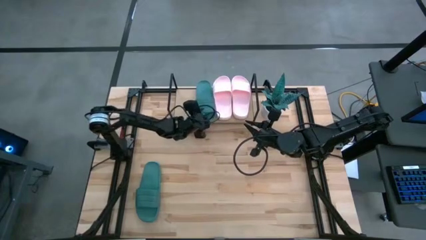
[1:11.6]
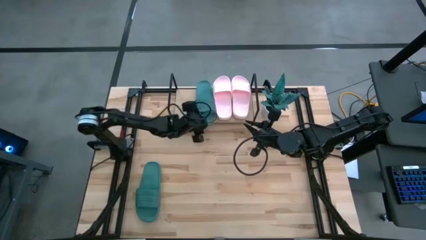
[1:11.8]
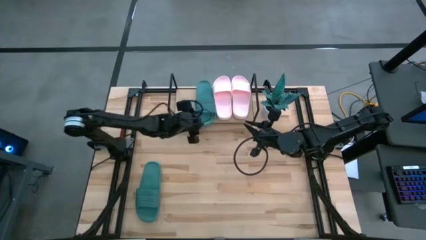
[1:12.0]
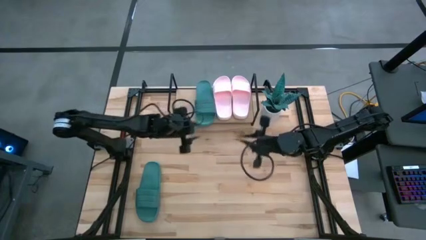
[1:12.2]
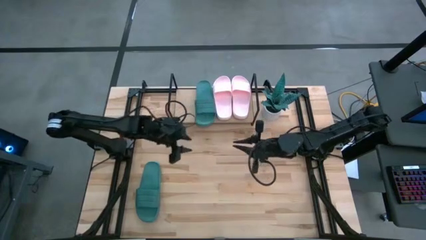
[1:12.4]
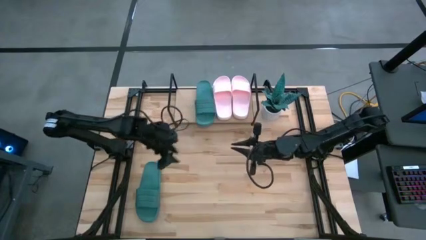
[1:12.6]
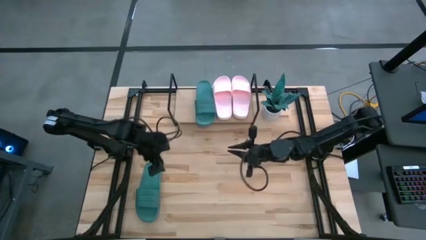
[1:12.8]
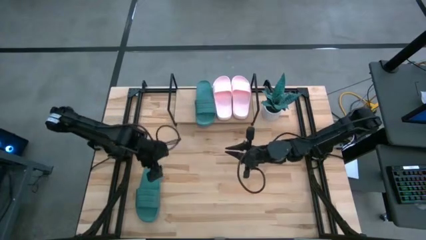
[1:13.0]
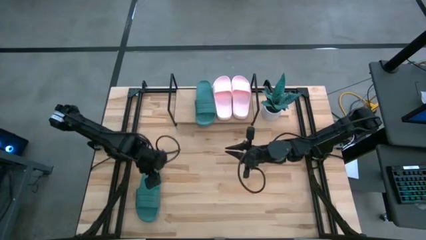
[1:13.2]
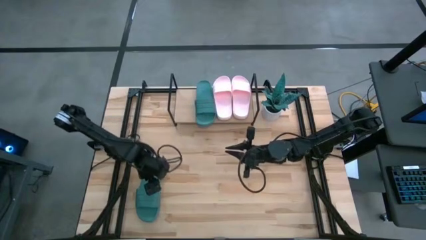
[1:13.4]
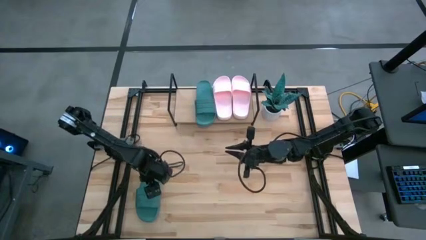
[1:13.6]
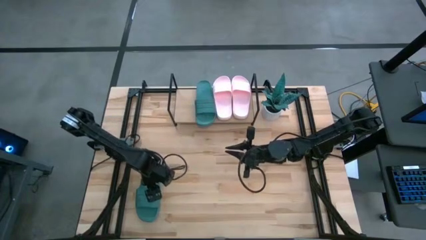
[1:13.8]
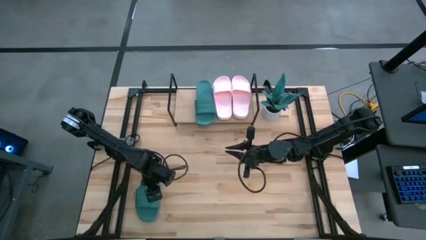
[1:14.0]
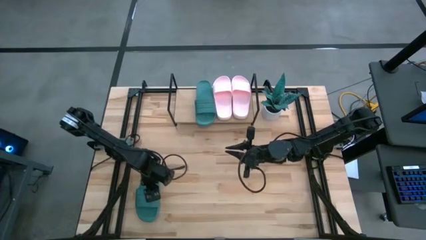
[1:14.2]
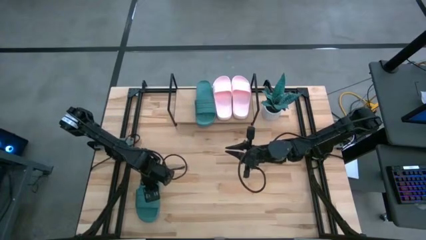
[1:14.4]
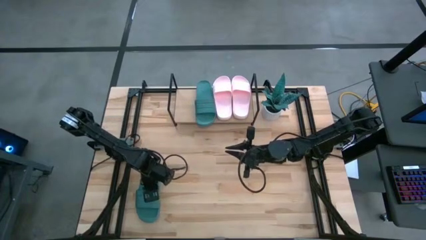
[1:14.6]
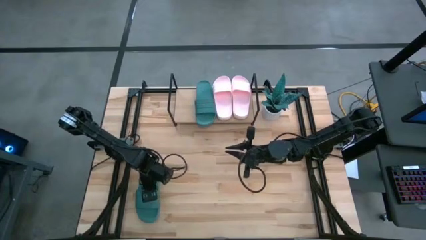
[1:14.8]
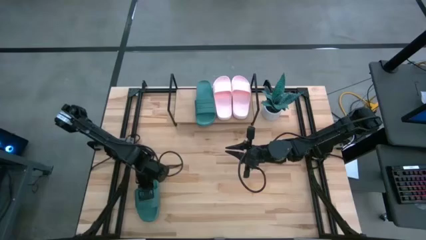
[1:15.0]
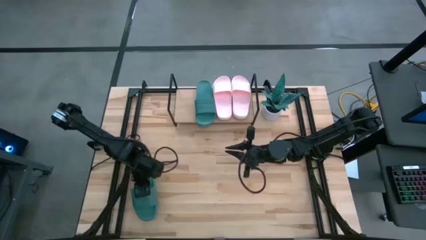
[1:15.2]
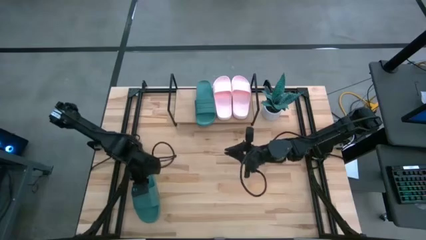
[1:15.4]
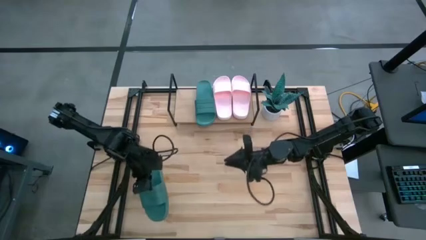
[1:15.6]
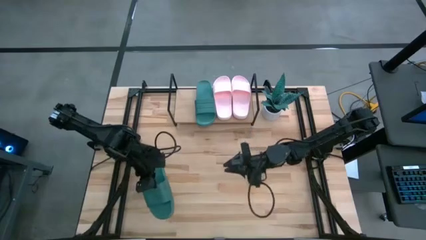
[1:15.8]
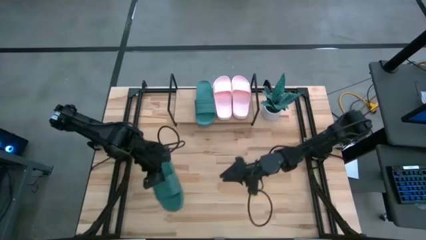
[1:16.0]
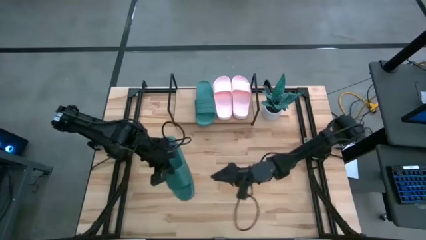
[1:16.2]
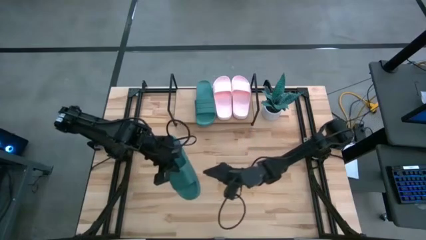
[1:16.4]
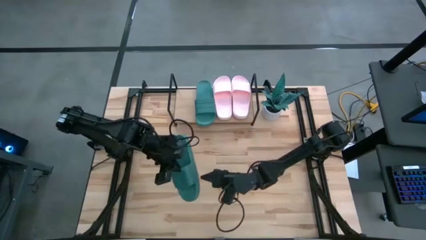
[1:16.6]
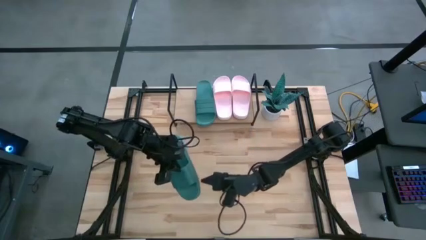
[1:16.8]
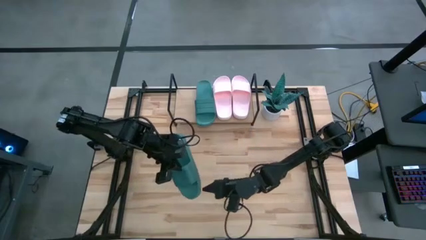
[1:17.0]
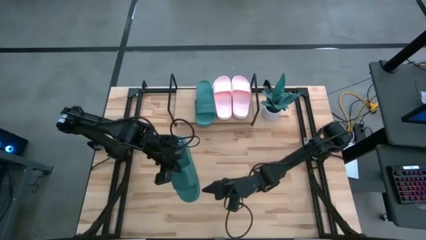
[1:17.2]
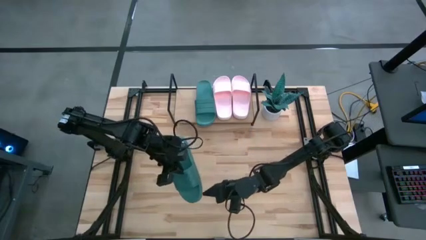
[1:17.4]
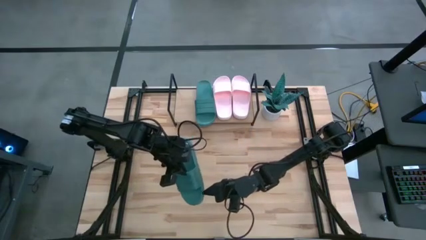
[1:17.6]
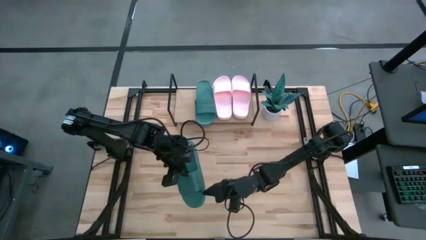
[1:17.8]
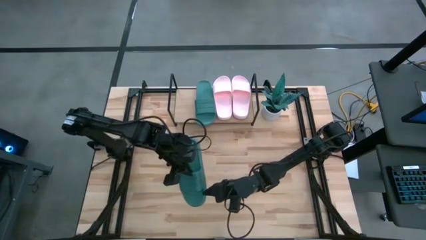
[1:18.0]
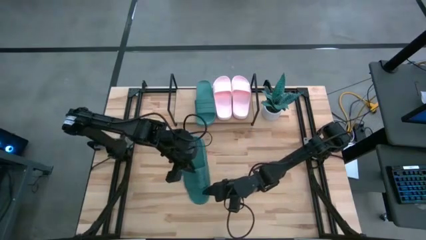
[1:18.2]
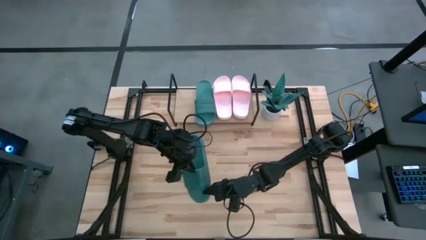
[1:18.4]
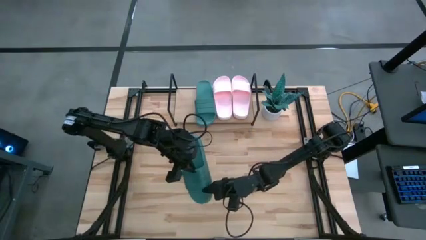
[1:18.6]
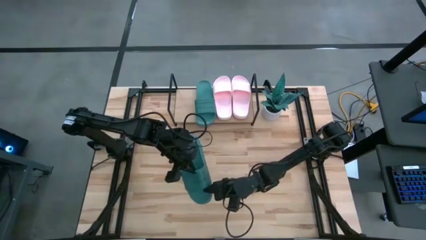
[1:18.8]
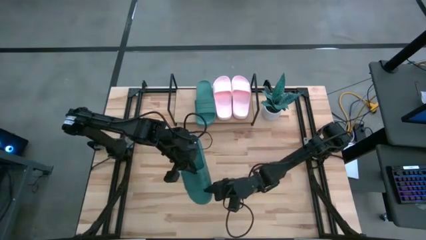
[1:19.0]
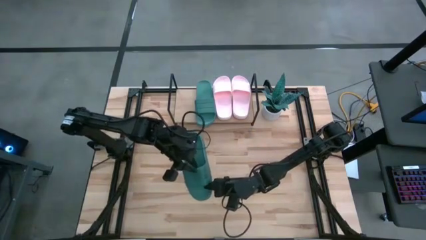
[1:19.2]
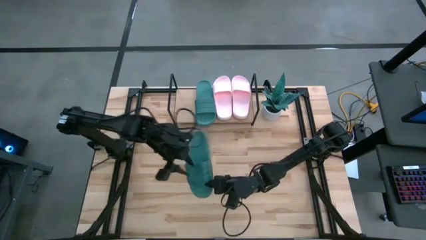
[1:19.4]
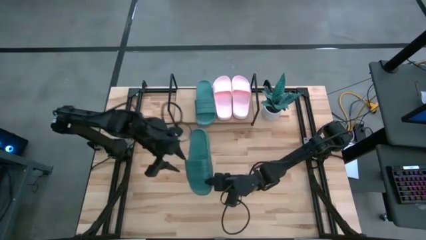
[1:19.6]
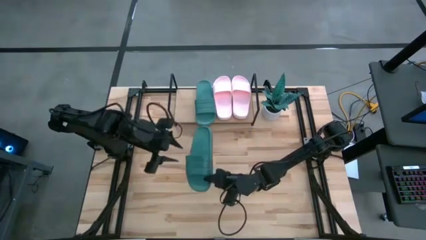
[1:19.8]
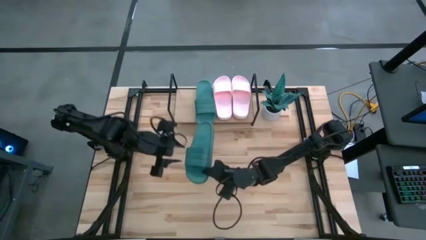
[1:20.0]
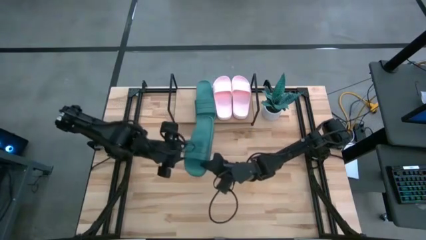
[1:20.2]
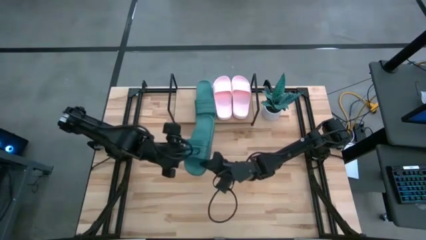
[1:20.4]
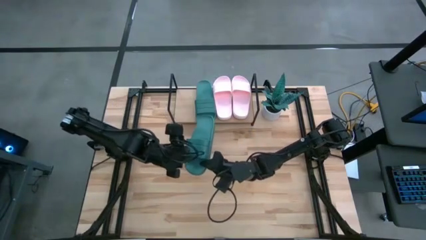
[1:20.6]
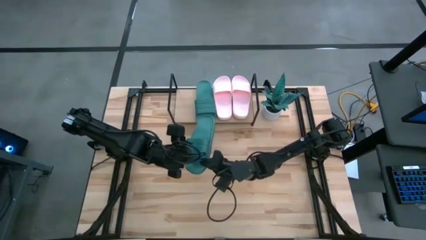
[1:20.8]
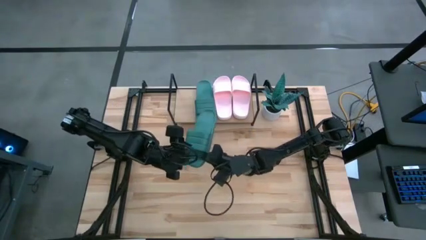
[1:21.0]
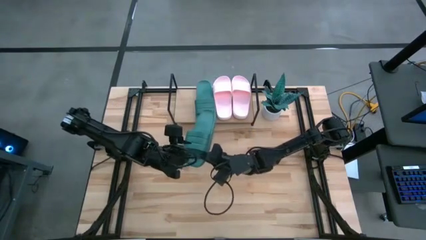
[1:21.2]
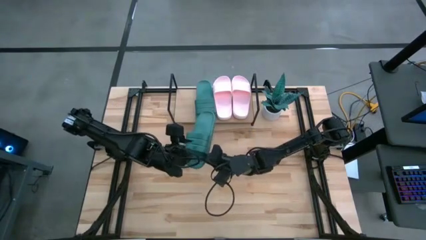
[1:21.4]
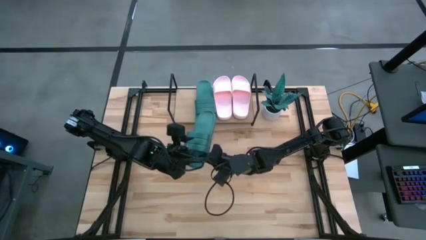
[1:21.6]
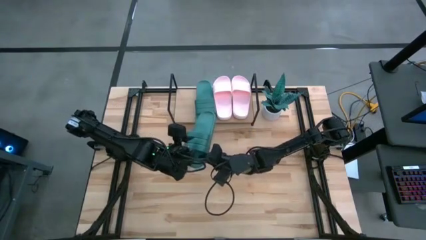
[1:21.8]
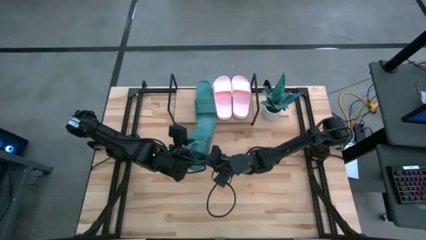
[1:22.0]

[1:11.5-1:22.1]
Task: Pick and place slides into the shelf
Put the green slipper on the shelf

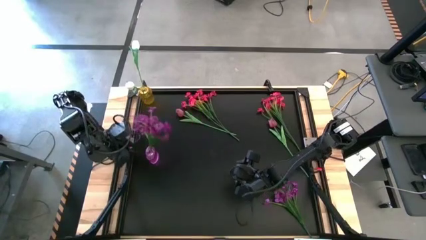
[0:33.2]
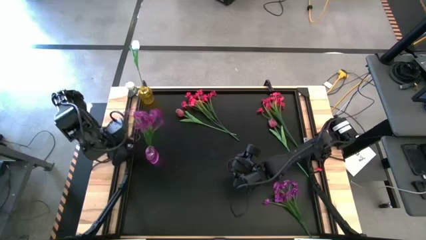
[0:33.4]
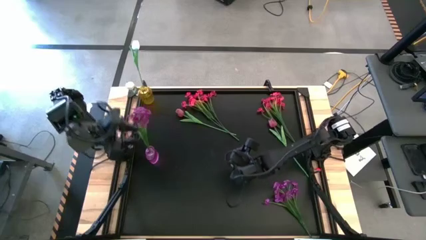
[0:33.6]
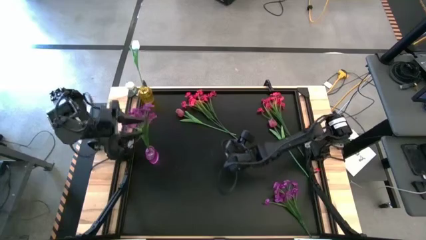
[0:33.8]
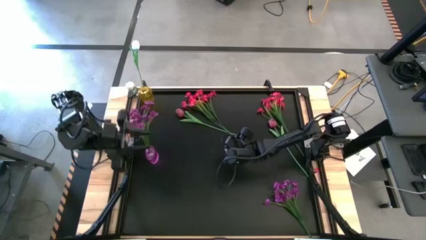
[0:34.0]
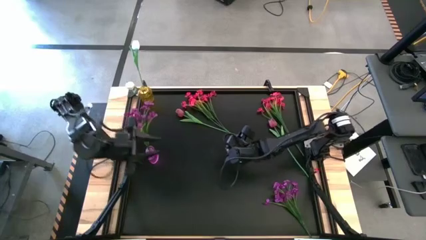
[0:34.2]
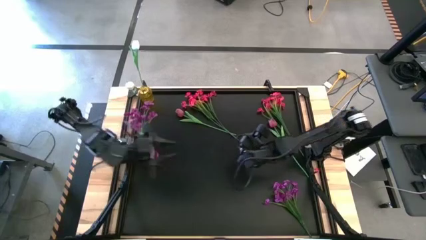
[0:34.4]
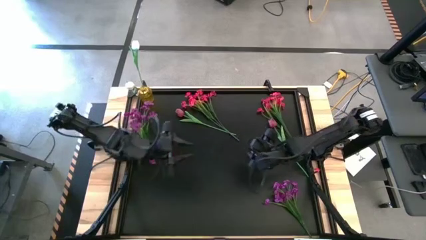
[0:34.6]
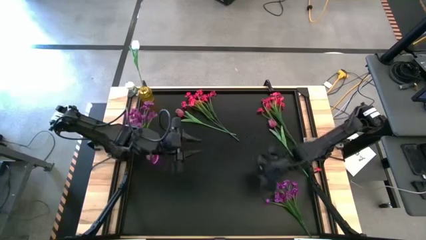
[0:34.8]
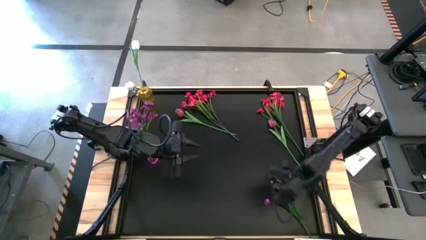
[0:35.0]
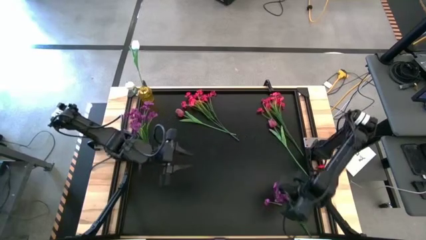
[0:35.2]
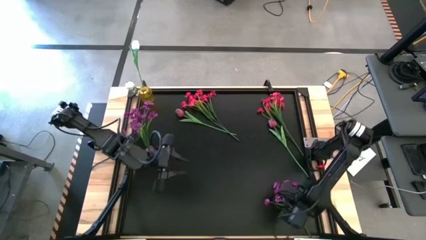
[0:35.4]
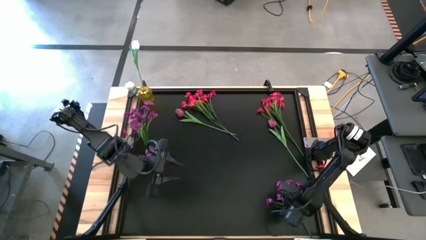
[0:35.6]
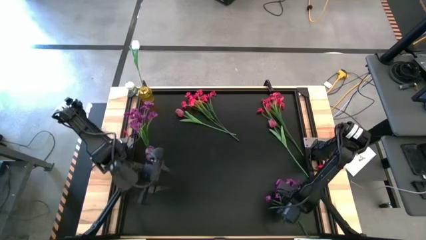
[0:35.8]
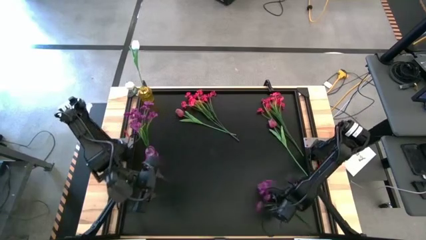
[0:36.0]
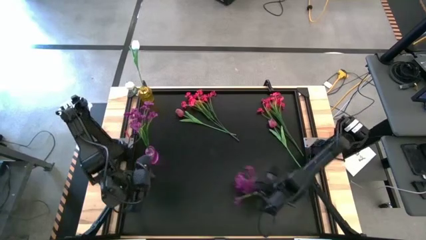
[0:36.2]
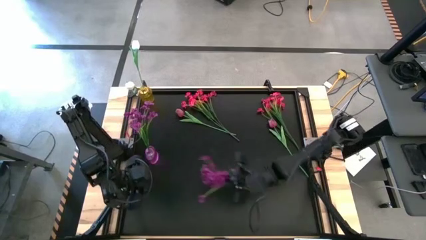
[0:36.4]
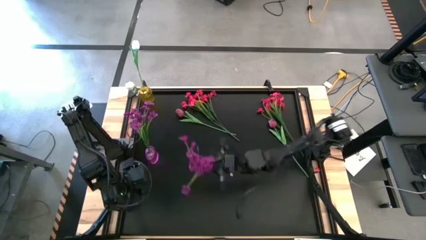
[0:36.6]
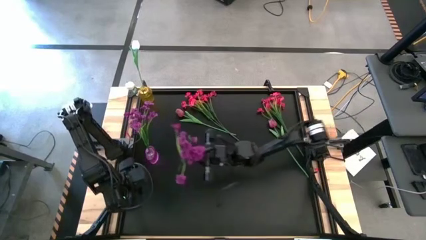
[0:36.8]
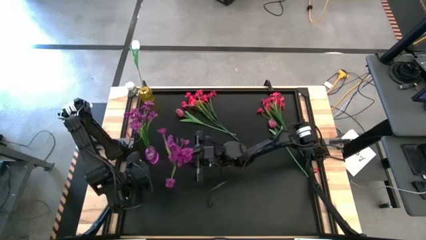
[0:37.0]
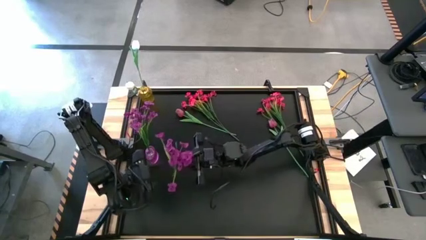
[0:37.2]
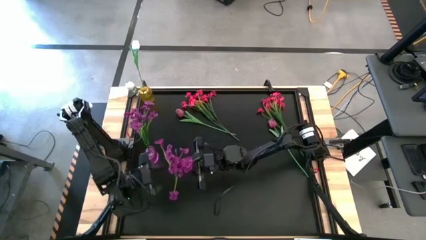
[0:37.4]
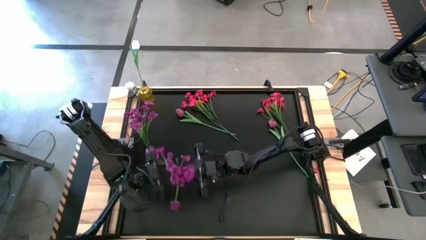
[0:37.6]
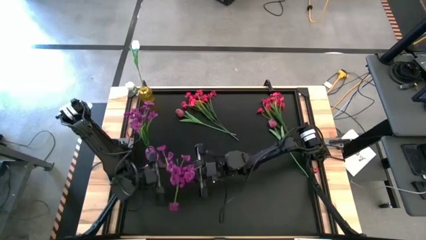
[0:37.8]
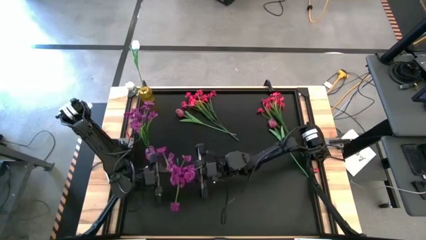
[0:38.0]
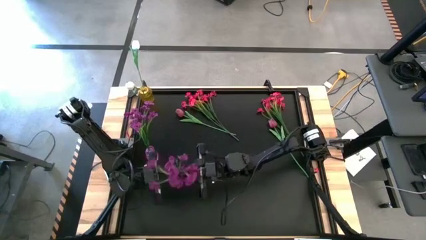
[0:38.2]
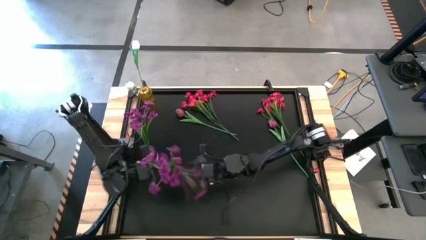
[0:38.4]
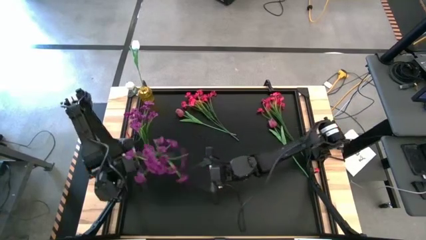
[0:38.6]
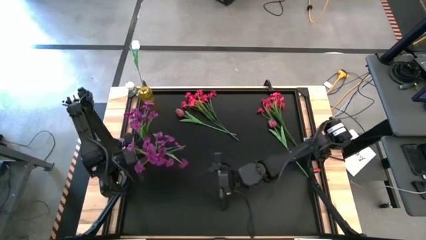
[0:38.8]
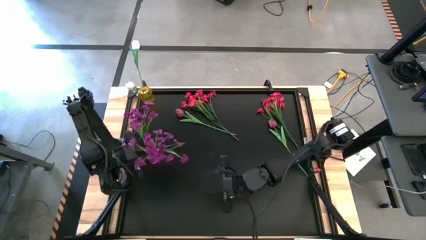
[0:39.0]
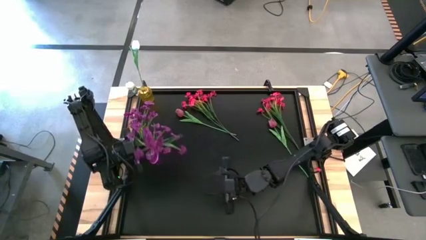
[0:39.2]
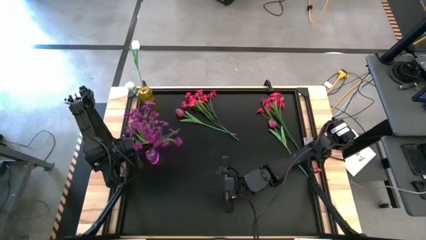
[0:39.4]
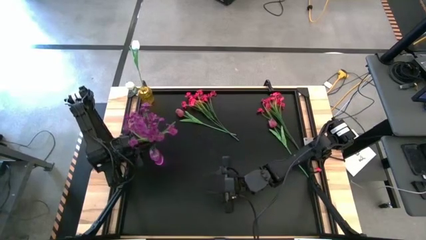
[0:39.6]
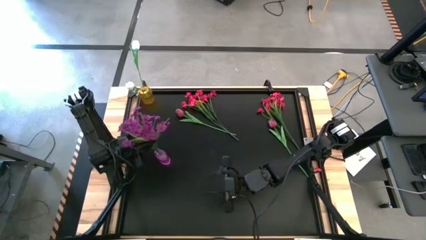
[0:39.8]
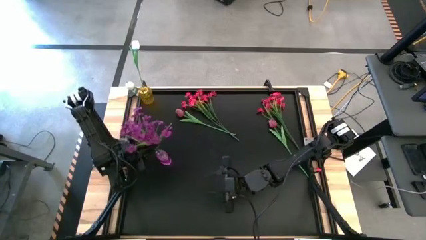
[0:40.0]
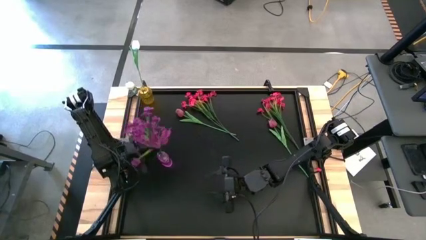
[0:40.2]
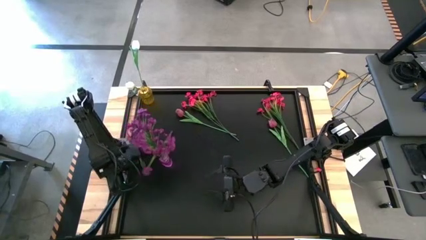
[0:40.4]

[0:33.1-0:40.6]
Task: Sort flowers into vase by color
Put the purple flowers into the purple vase
